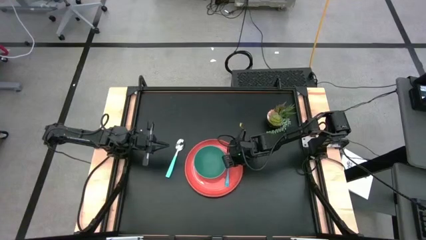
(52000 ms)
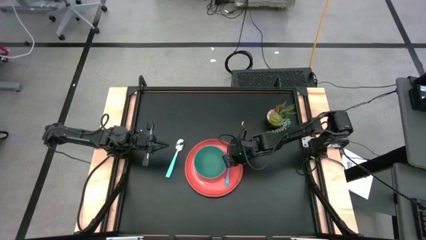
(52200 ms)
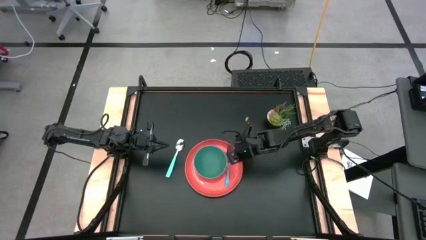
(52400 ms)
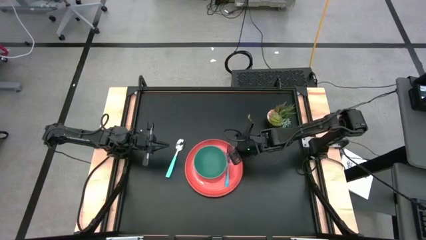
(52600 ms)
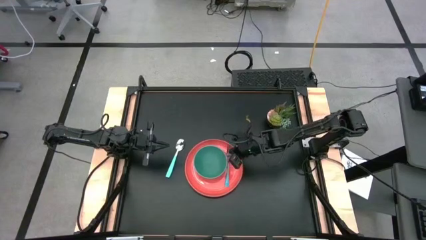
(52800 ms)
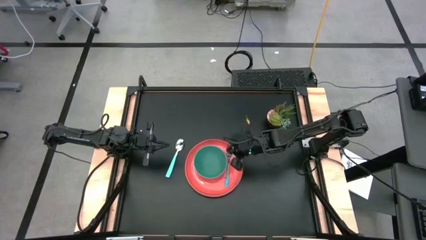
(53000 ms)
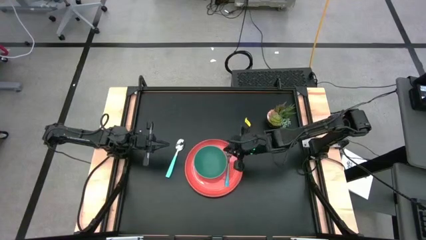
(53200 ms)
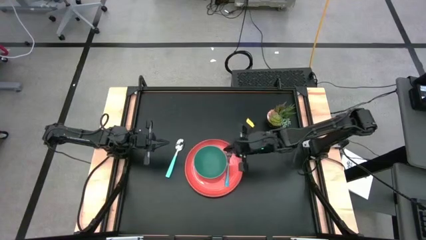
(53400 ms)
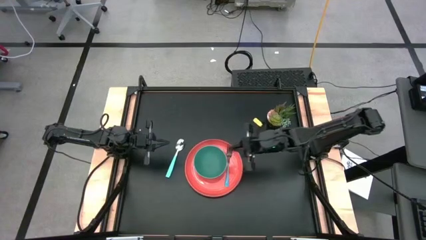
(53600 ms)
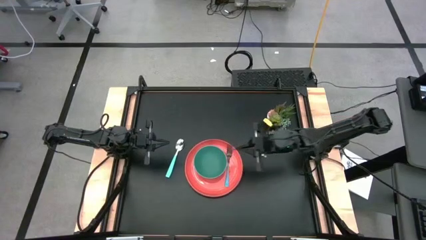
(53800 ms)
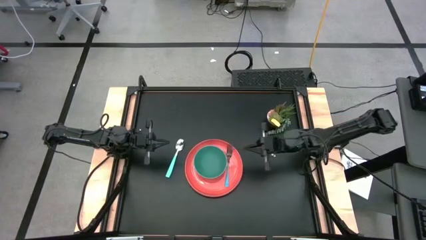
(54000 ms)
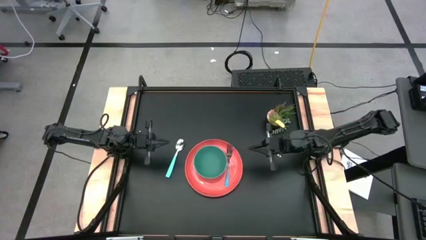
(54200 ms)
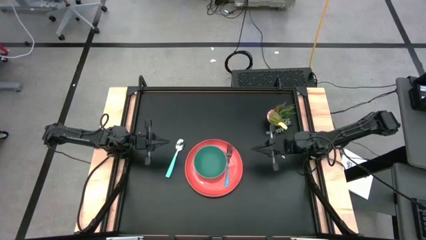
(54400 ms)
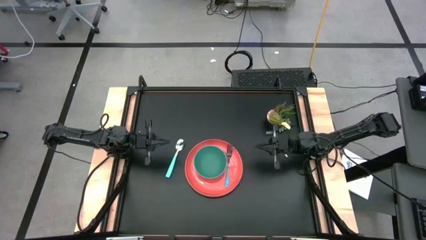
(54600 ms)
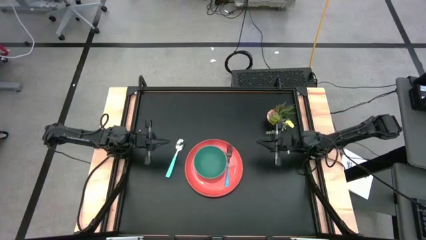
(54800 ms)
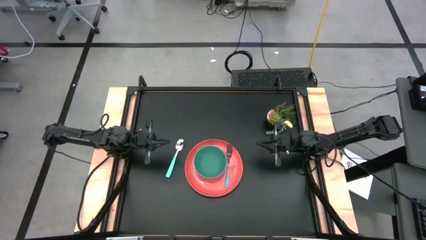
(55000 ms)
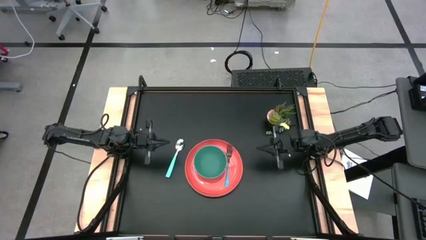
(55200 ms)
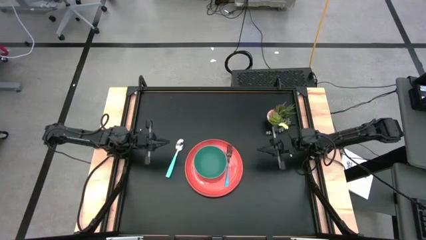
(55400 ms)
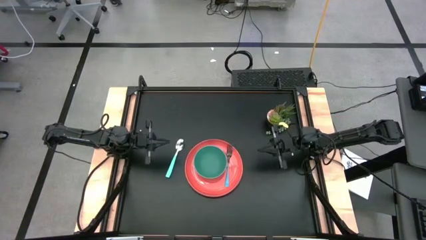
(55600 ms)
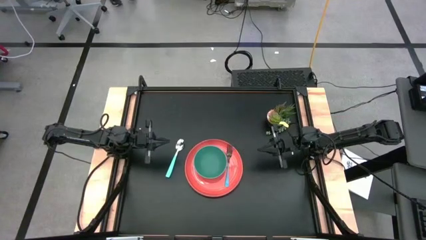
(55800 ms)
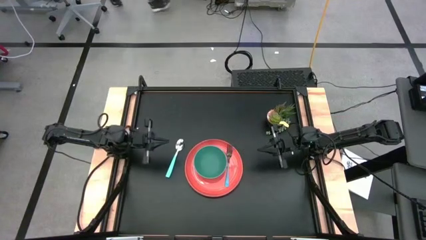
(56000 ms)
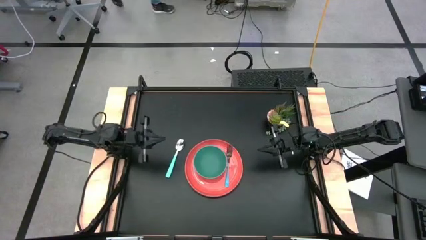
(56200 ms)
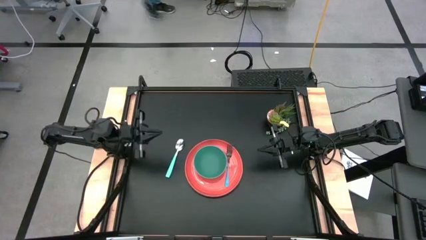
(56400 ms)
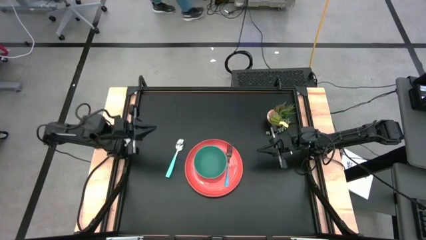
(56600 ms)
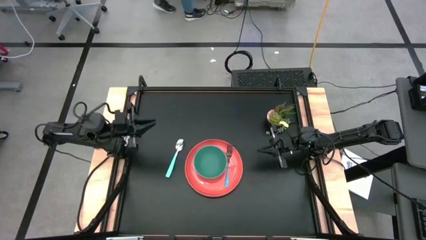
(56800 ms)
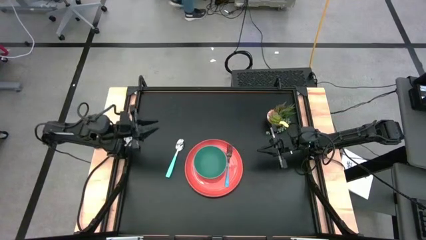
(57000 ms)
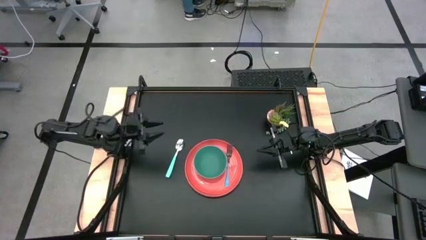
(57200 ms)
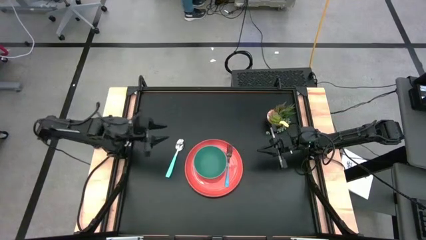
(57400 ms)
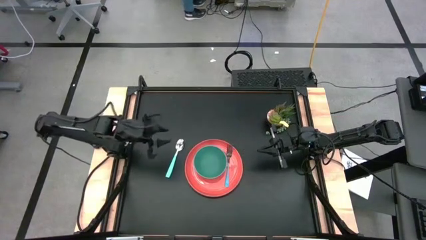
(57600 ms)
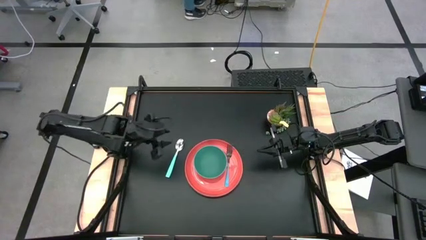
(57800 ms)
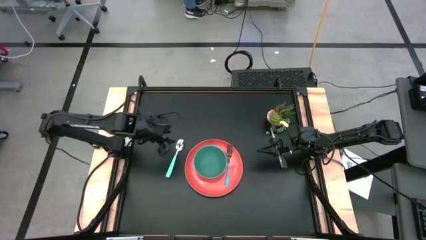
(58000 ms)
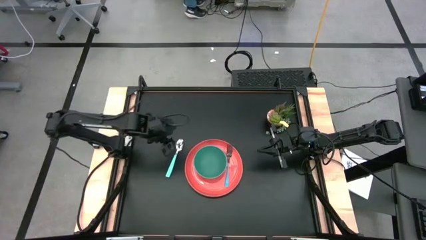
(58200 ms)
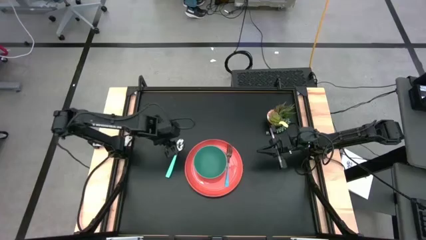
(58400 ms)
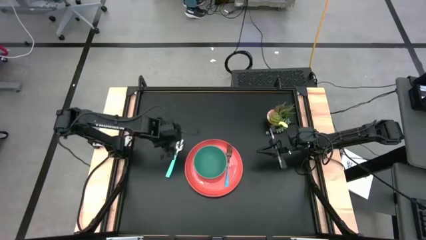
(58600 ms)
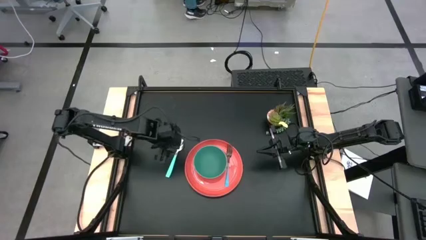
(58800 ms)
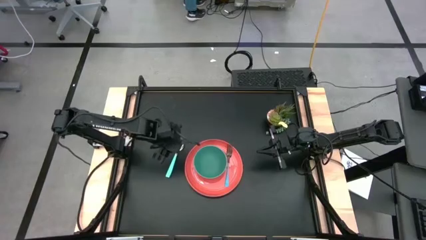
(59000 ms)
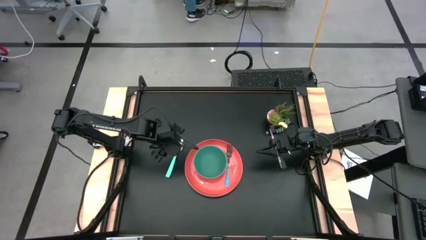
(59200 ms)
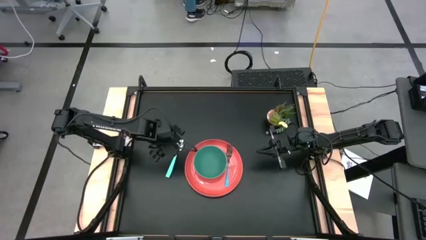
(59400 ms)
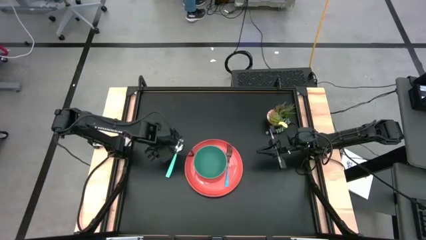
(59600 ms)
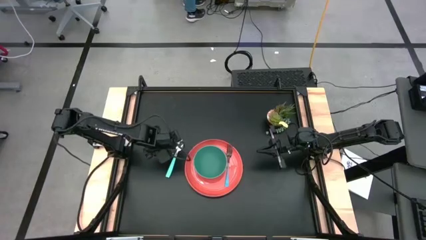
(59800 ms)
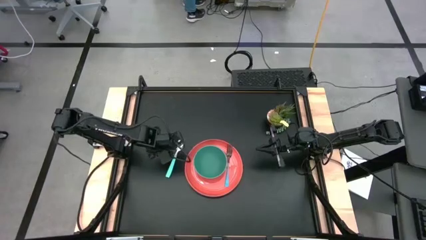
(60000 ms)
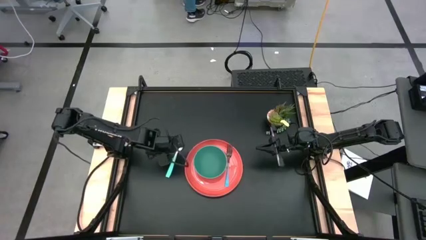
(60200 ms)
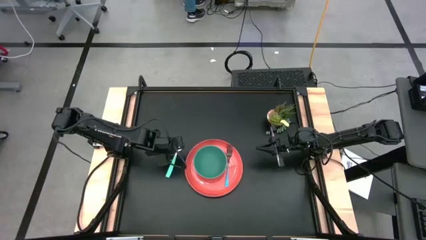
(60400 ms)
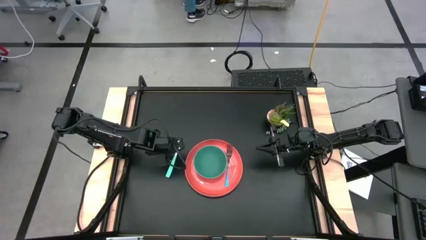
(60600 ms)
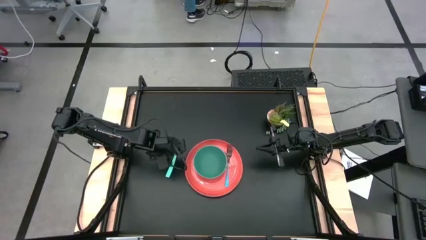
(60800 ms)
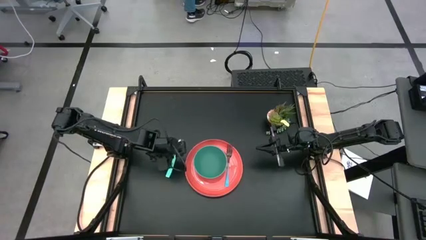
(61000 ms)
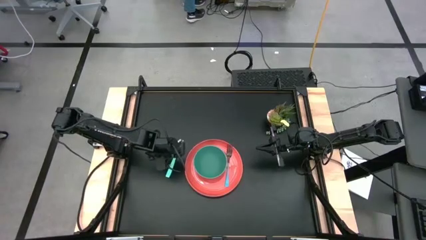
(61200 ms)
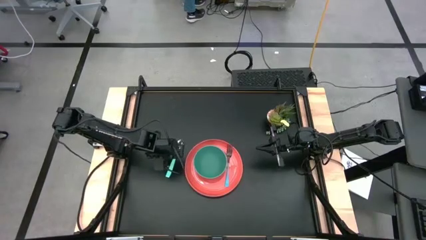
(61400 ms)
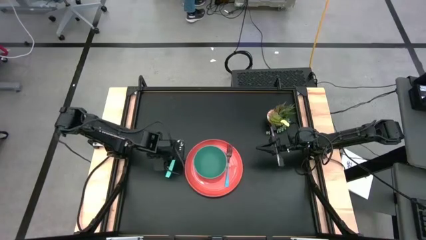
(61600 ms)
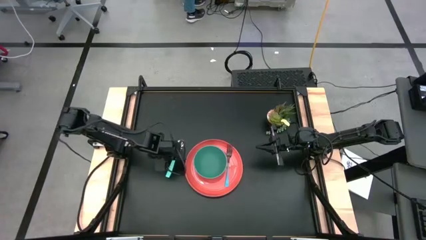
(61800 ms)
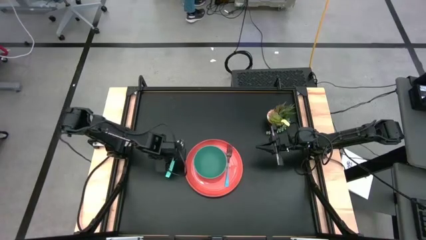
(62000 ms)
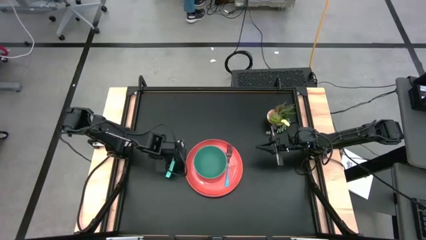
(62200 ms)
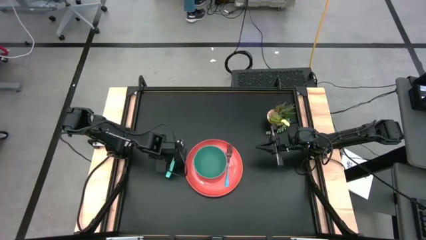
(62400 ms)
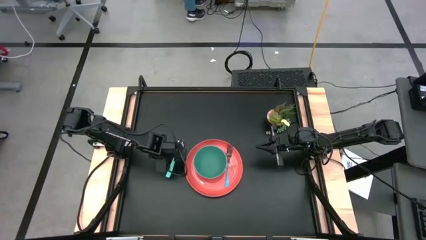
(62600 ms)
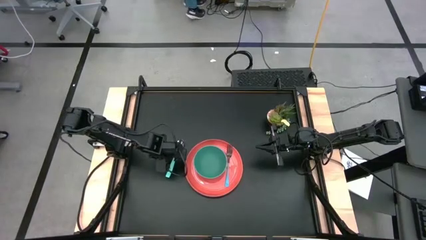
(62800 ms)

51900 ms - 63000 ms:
Task: Set table place
Put the blue spoon into the green bowl

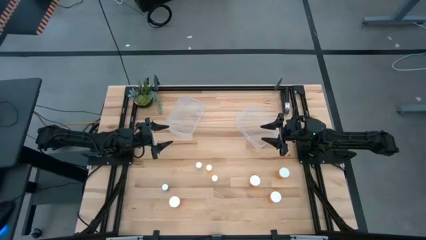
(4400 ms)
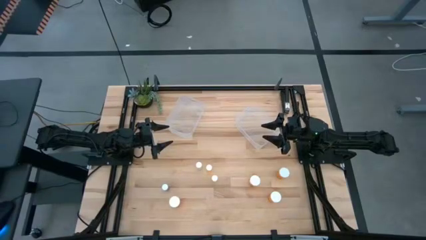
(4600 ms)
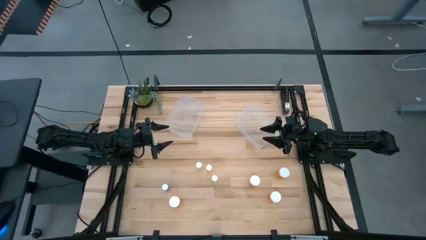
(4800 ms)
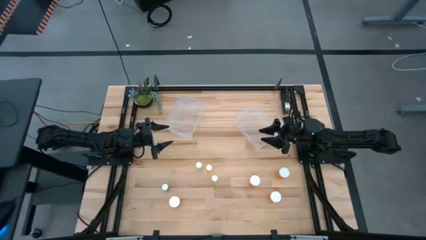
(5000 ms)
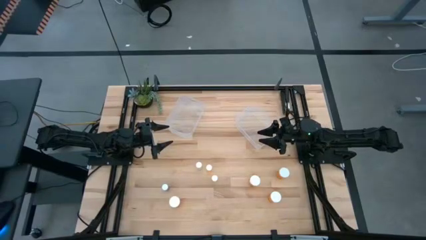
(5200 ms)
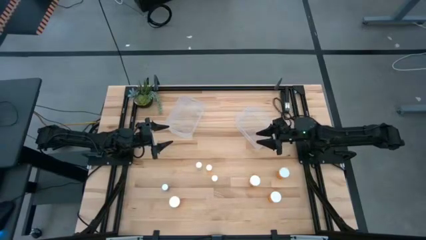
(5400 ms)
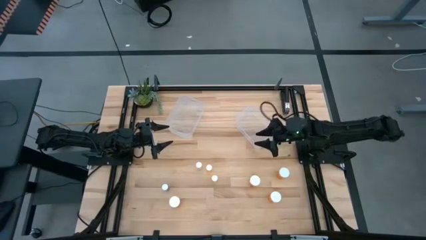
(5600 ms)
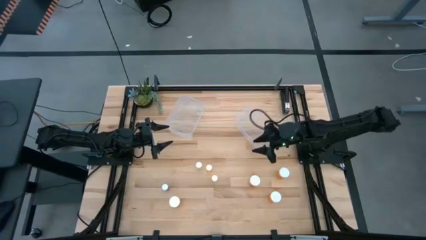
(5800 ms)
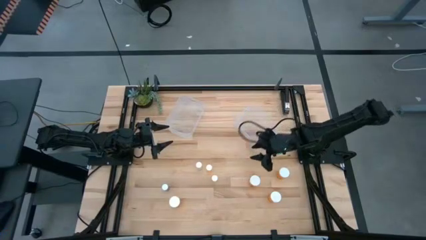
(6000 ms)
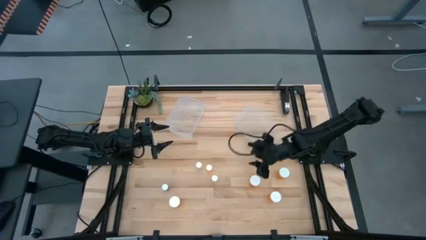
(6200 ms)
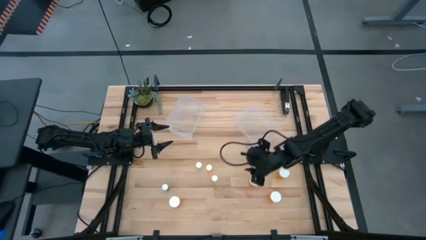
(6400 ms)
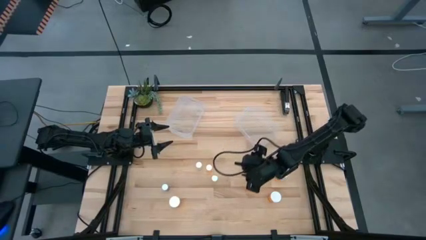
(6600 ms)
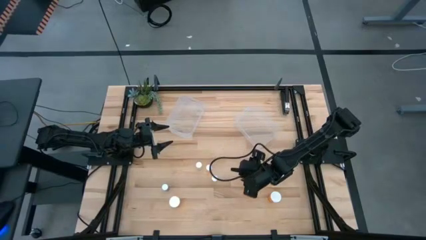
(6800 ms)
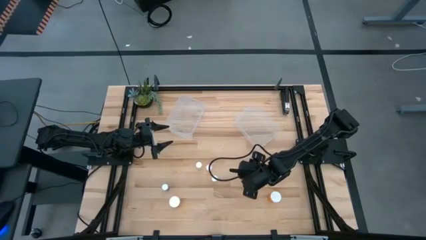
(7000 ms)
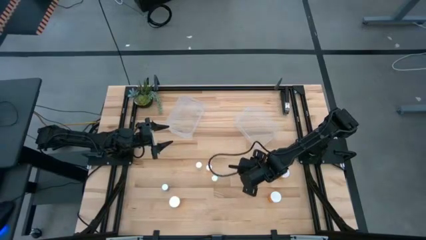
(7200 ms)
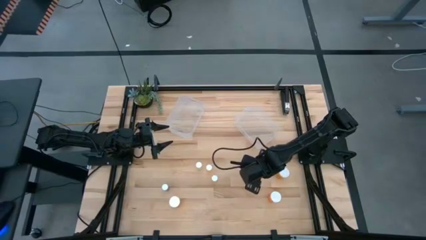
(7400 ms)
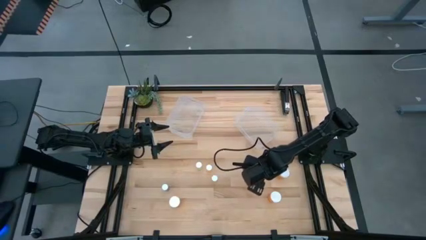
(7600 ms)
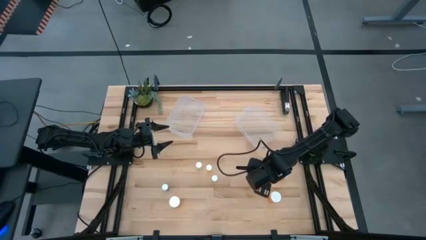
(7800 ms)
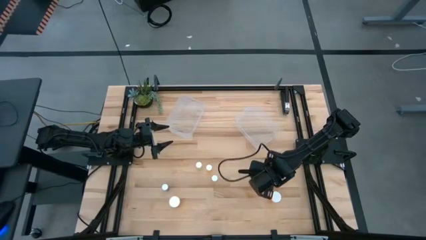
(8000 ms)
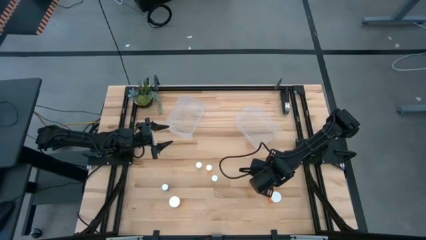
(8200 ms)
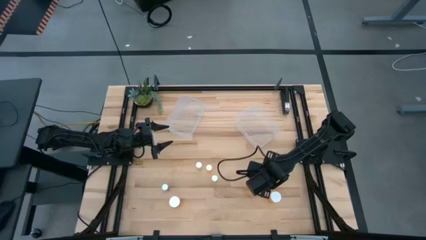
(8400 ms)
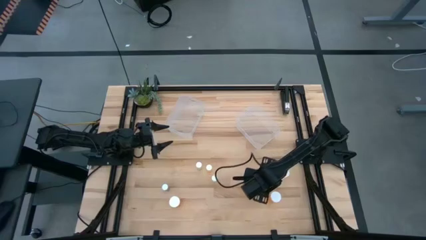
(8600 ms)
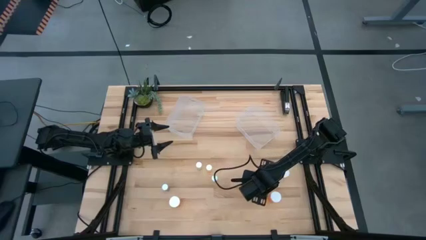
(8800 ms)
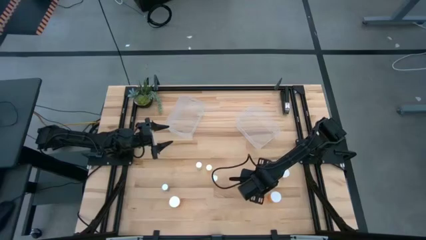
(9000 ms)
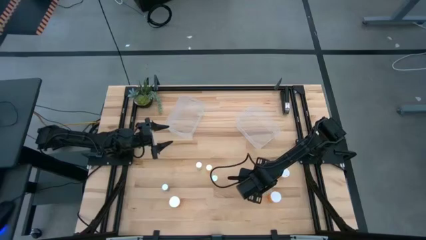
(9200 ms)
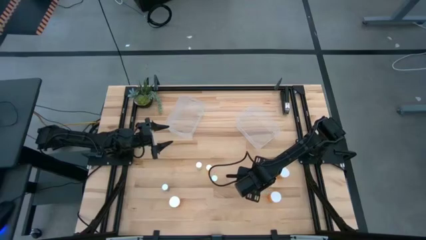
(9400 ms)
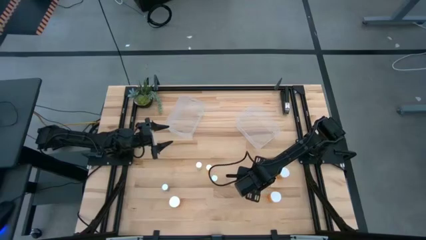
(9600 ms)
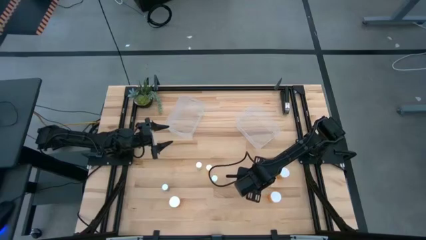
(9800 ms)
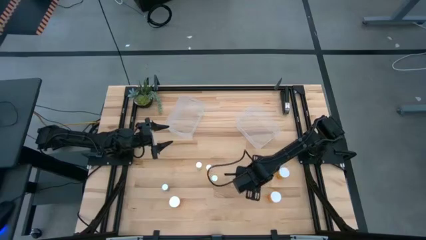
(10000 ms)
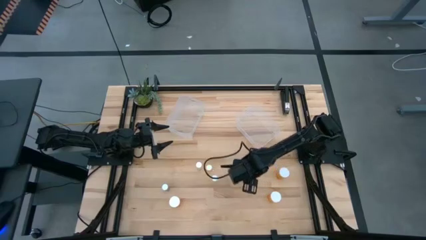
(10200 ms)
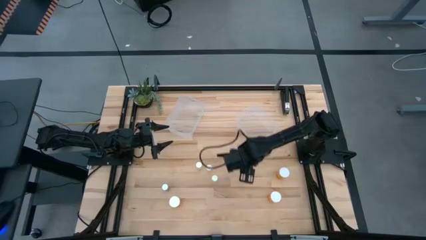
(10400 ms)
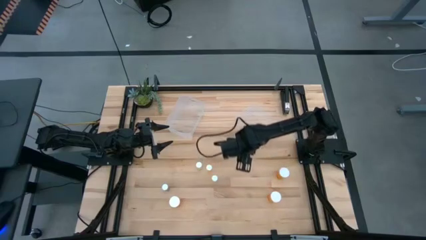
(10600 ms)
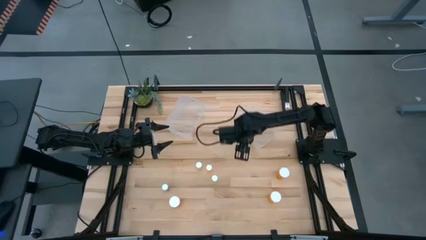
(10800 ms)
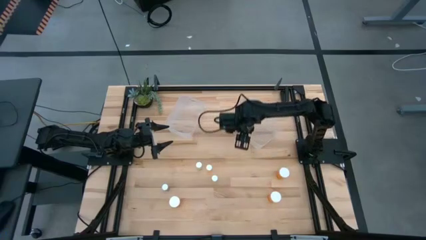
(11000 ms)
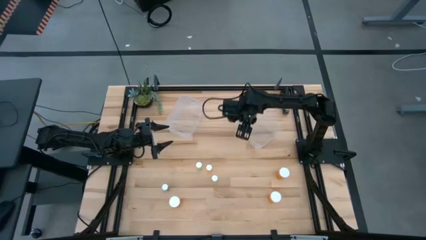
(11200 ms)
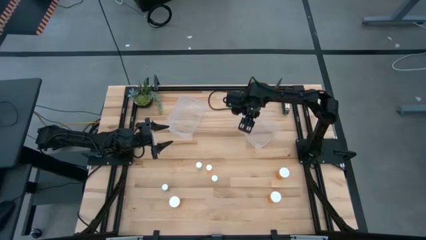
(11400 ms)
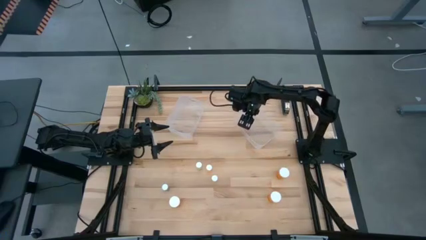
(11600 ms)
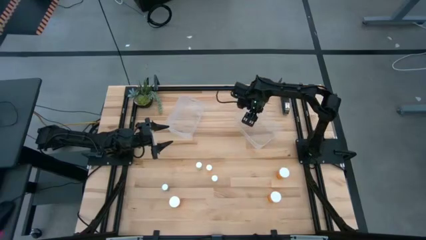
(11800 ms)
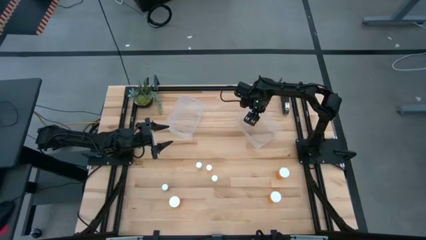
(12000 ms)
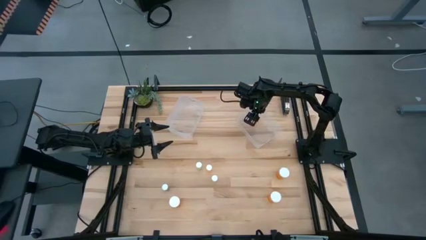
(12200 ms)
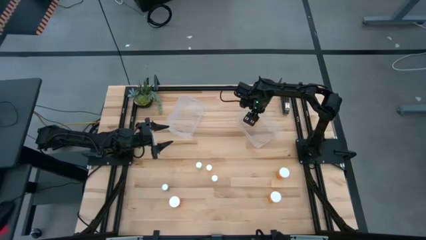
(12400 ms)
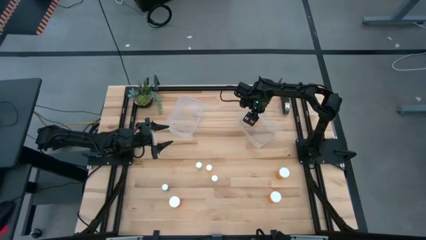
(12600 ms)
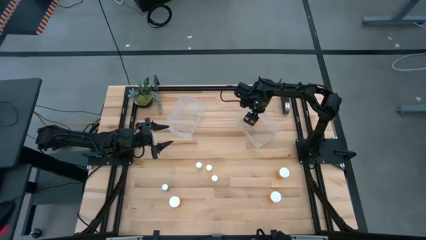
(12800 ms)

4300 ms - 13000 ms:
Task: Pick and place medicine bottles into bin by pill shape (circle, oval)
Put the big orange pill bottle into the right transparent bin
